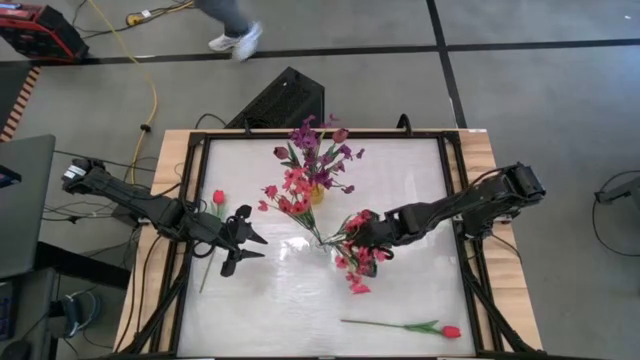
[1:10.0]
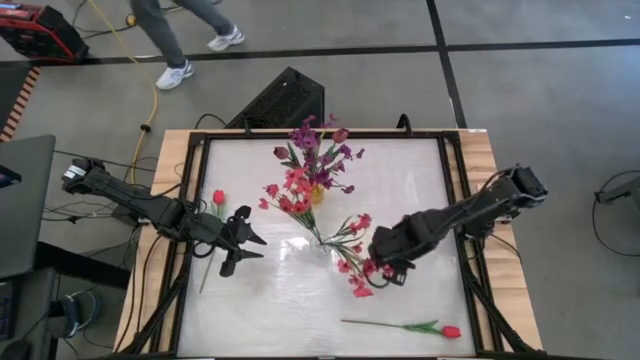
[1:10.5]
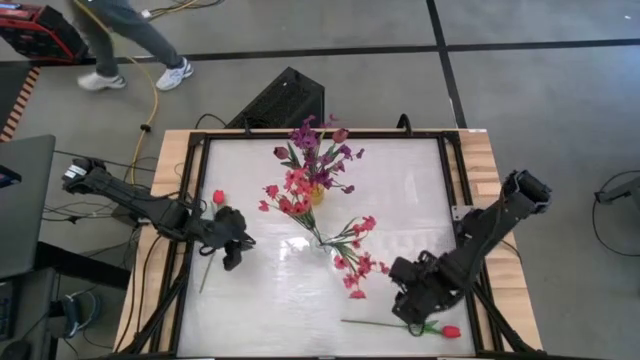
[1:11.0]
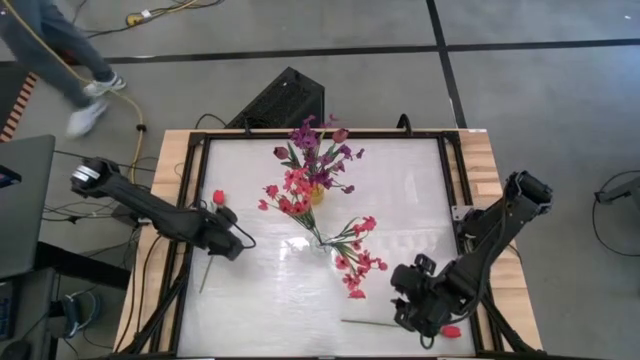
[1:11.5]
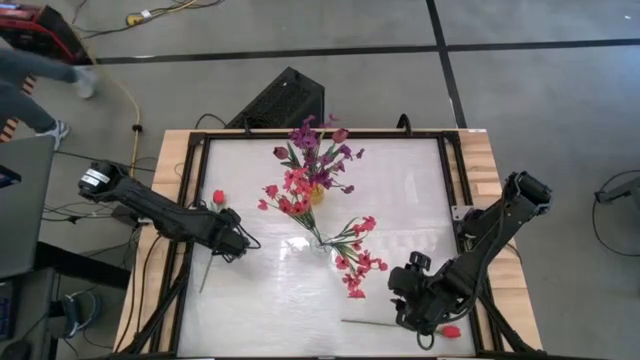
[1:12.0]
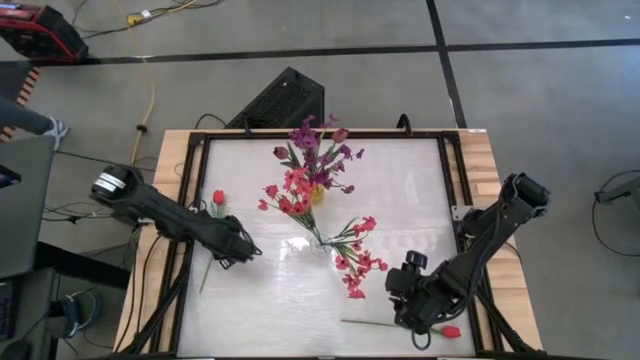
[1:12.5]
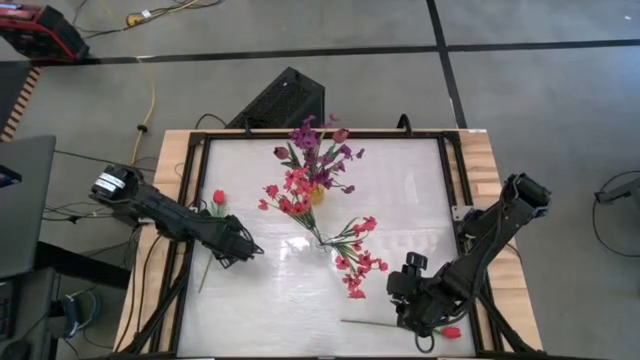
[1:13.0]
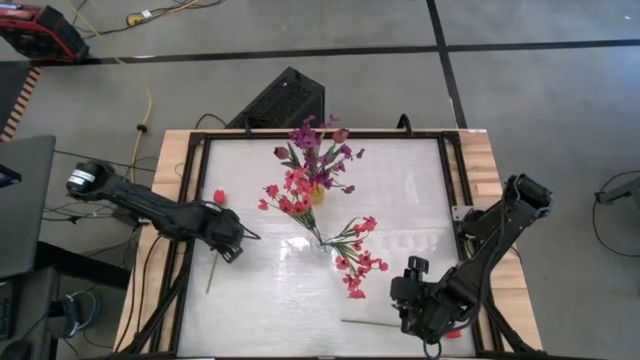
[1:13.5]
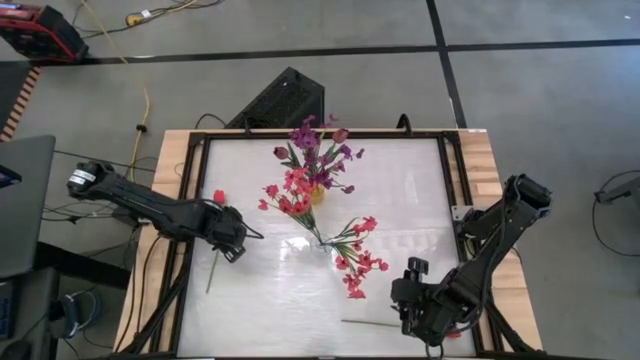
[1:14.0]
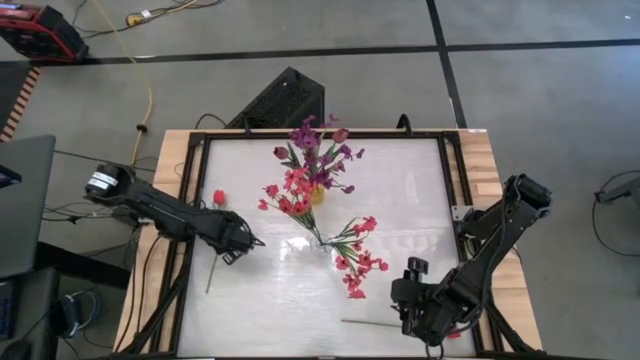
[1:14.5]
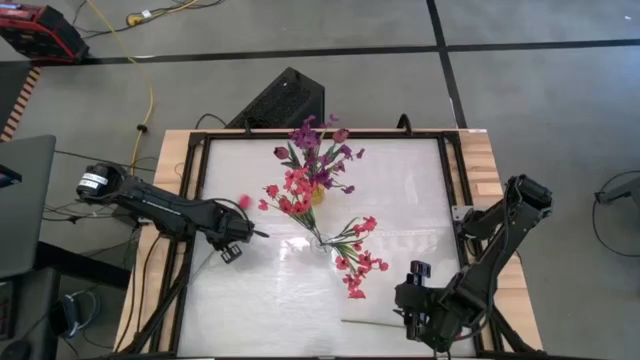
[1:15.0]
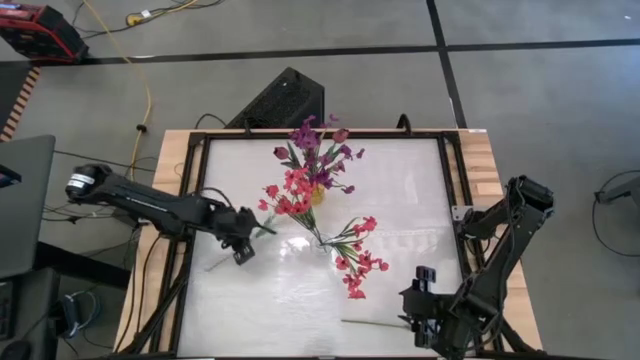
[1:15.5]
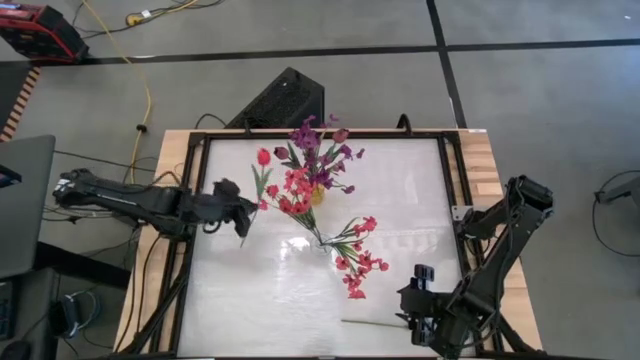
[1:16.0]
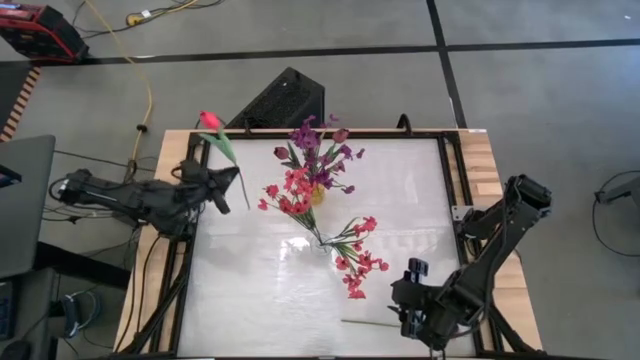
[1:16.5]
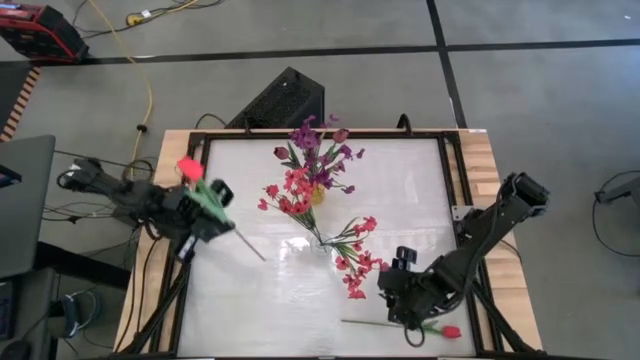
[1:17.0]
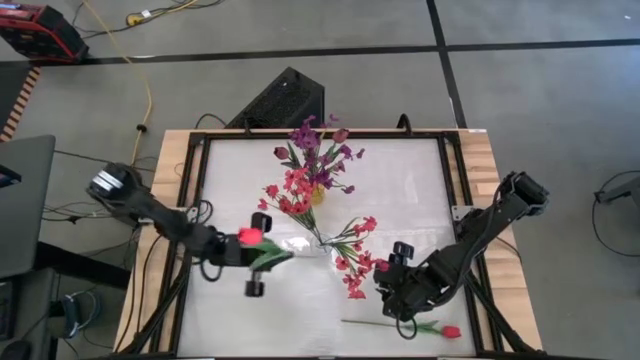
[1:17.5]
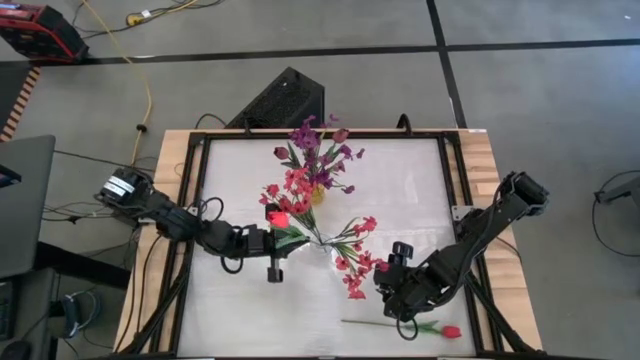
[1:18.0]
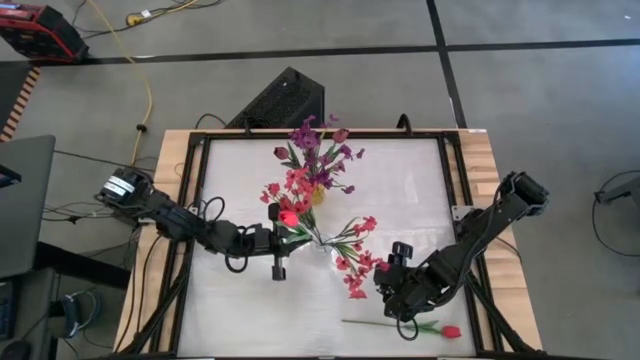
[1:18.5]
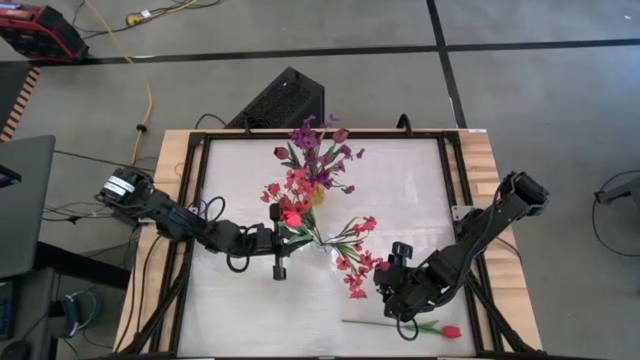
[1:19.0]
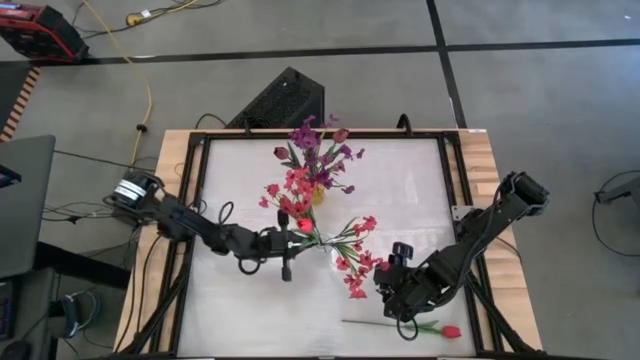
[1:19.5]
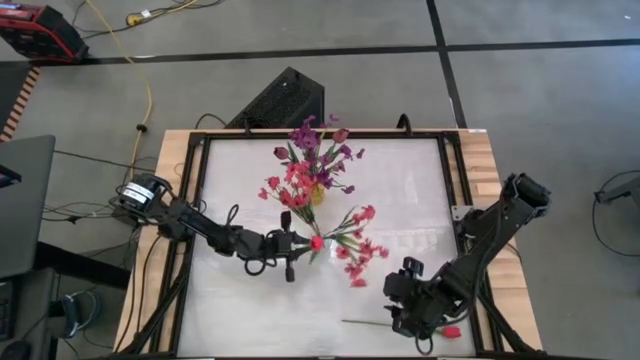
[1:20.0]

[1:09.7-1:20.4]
Task: Sort flowers into vase by color
Put the top pink tulip into the transparent vase

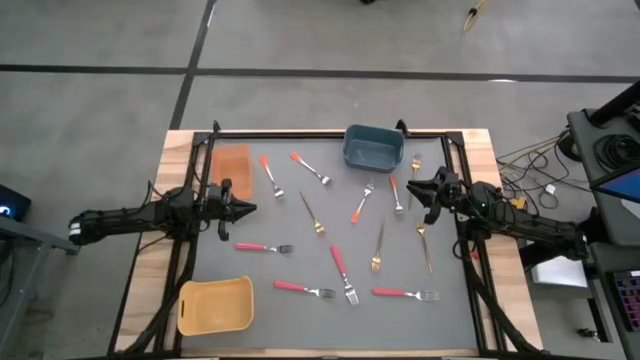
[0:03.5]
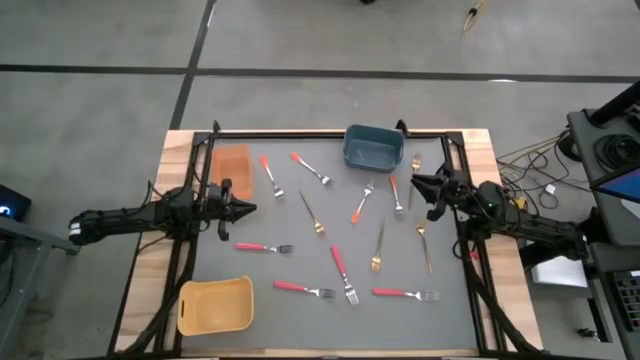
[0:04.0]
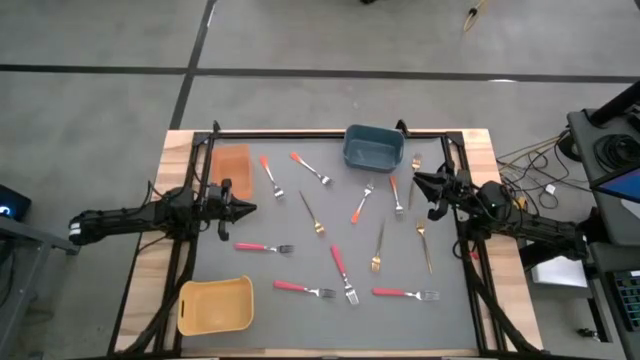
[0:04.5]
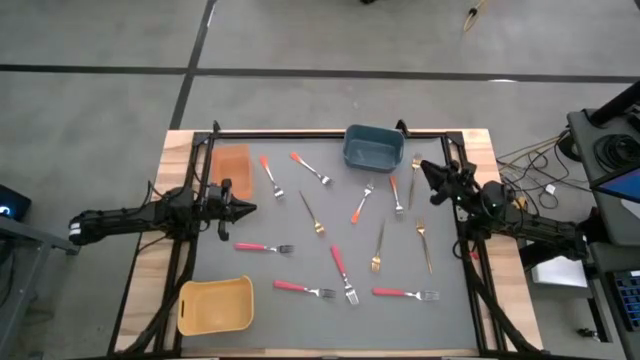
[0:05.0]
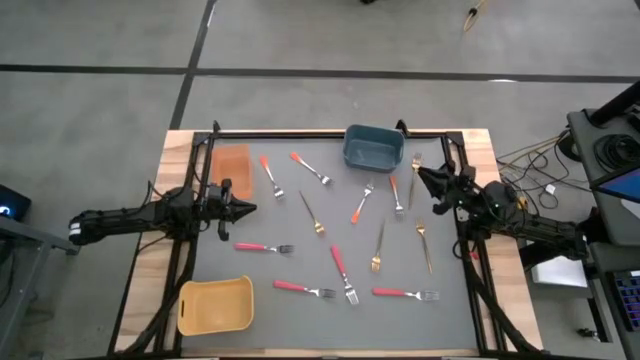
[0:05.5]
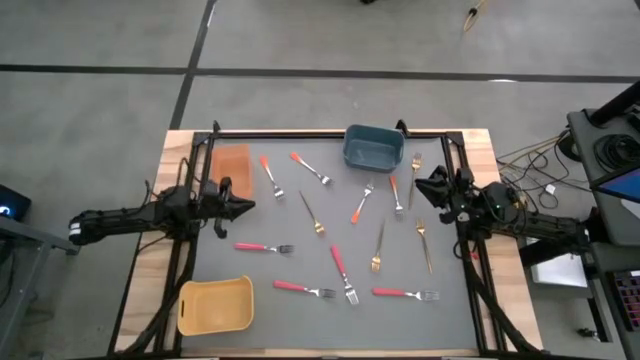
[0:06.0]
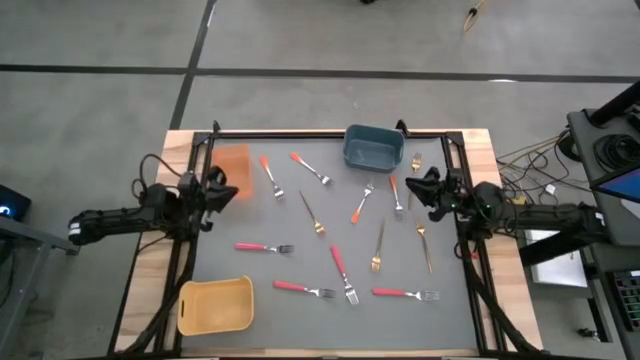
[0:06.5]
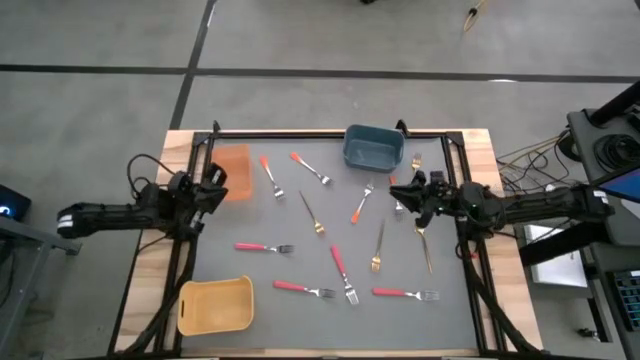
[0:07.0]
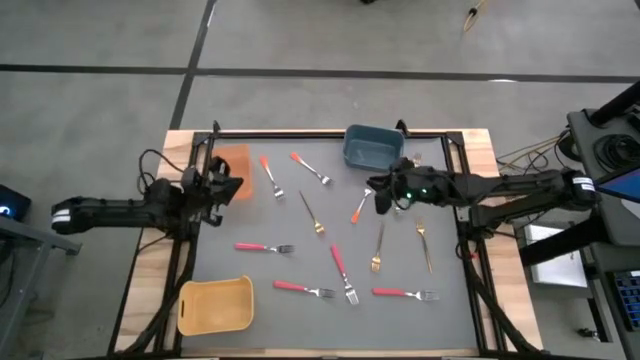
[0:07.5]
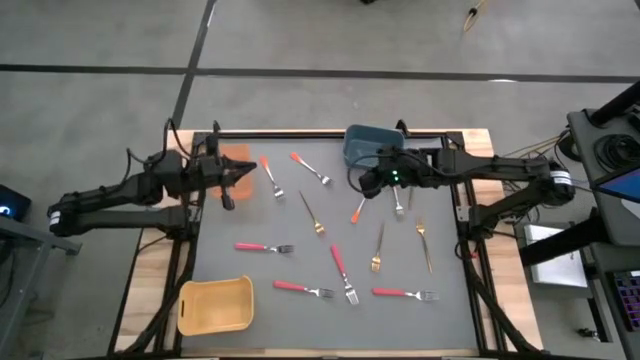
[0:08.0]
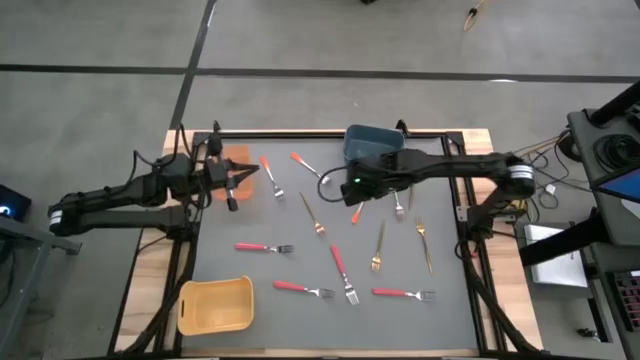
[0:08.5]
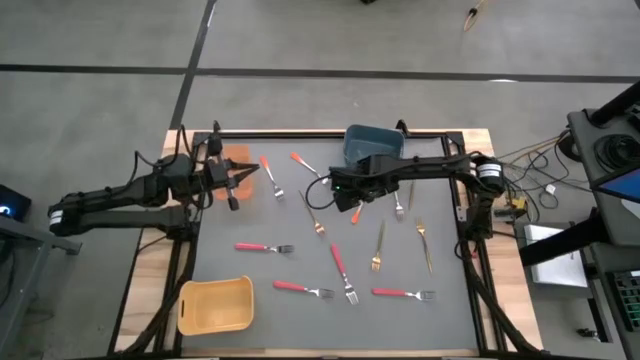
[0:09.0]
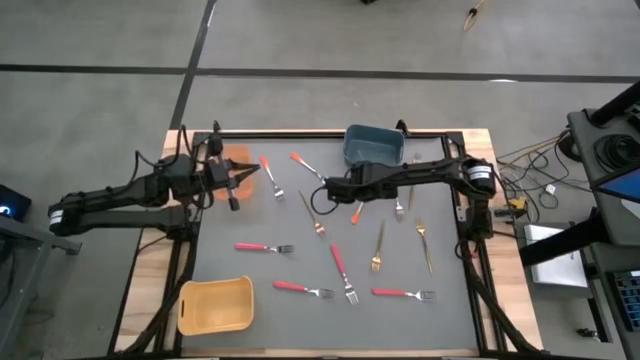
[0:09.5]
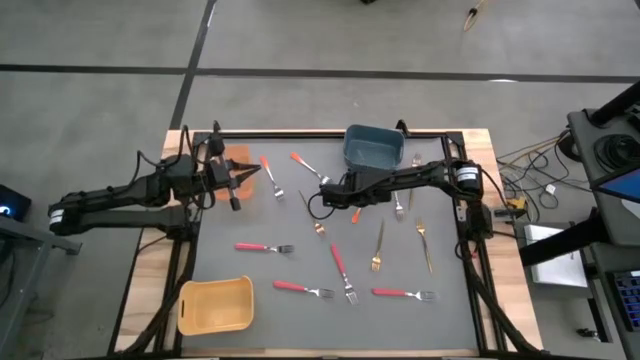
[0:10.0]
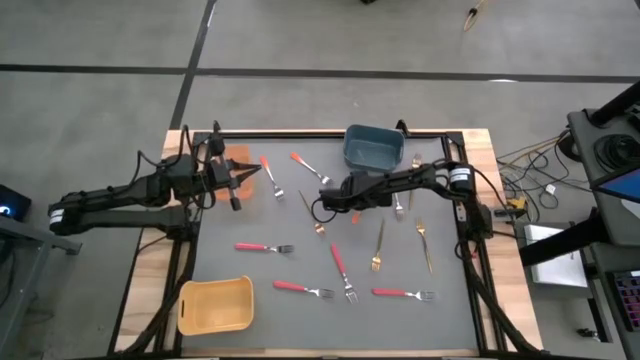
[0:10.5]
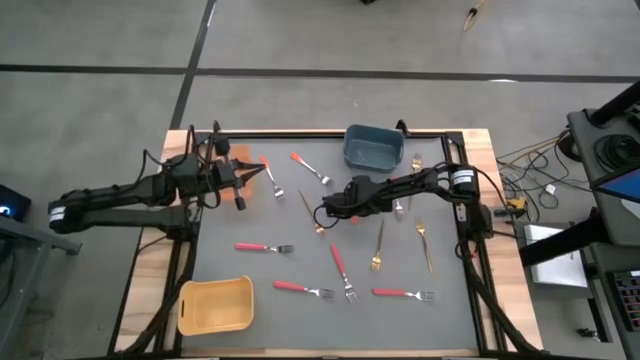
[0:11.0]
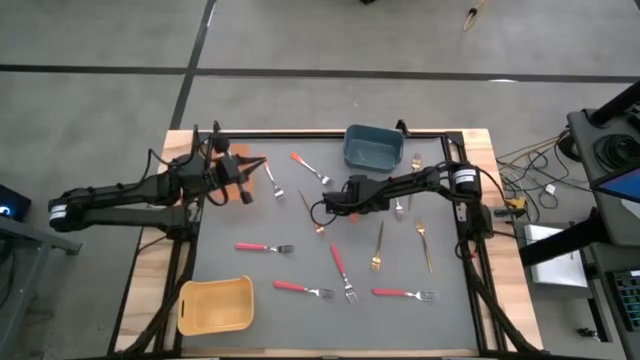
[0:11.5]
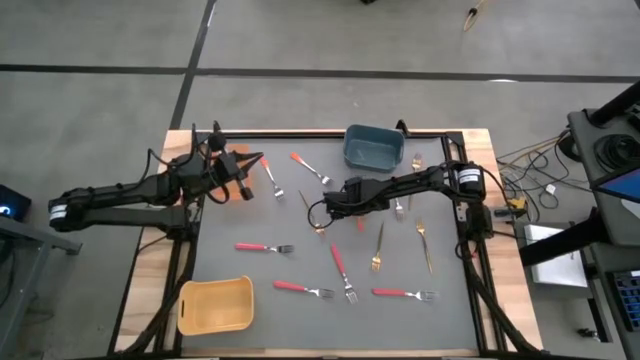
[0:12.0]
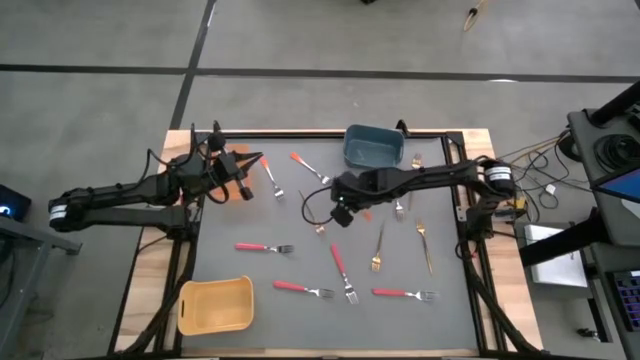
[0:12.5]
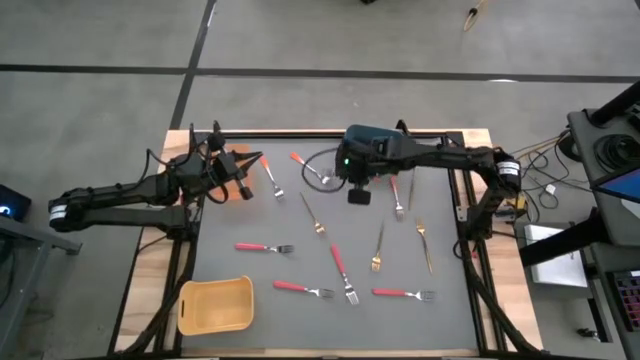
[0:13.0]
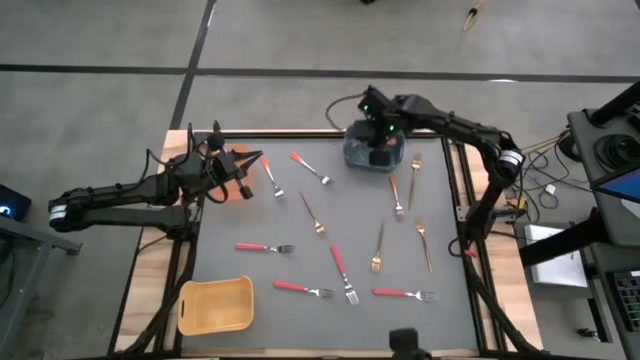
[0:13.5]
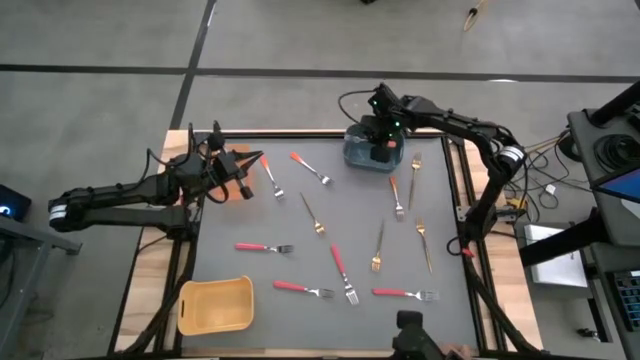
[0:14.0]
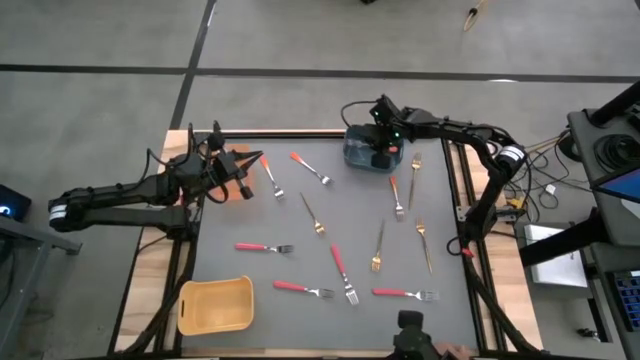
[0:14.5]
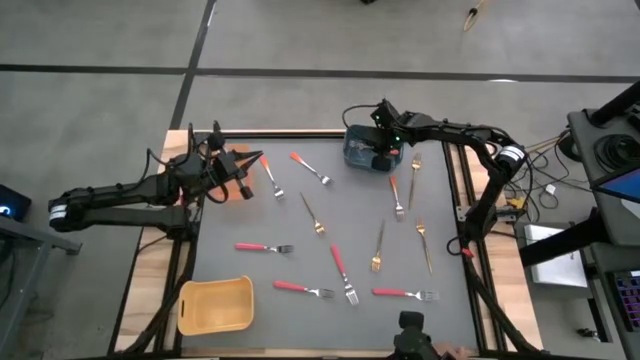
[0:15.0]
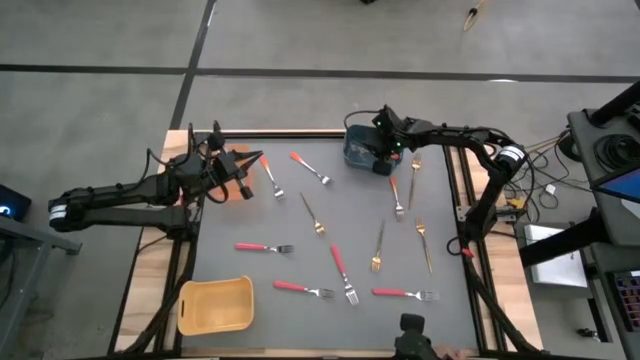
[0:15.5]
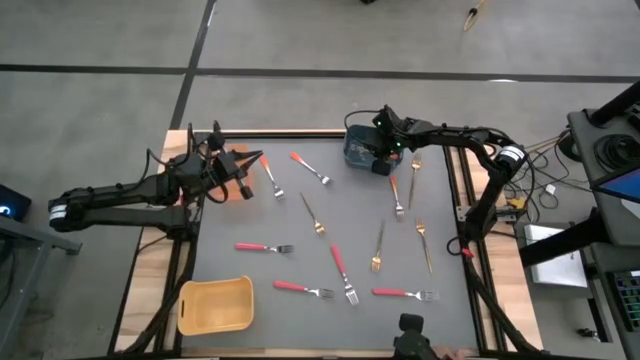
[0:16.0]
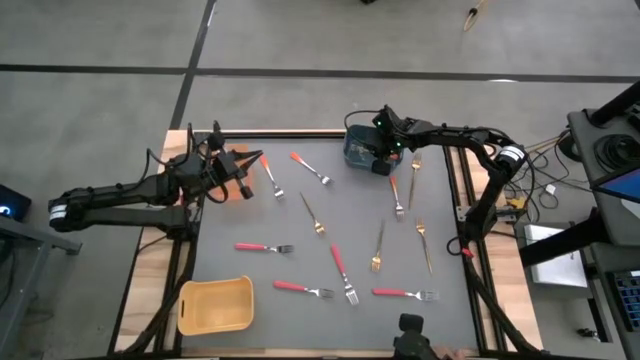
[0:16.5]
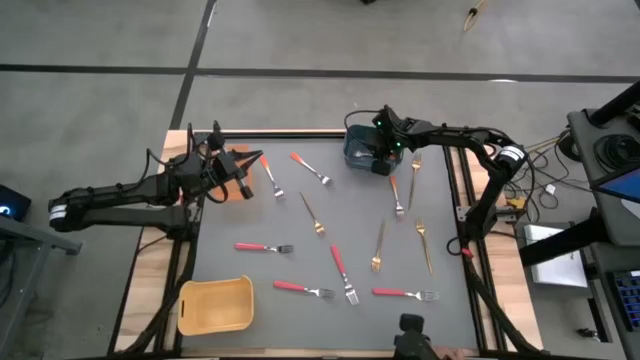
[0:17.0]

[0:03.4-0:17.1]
Task: Sort silverware by color (type)
Put the orange fork into the blue bin
